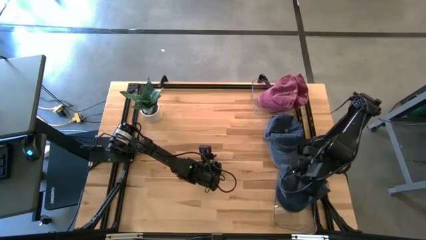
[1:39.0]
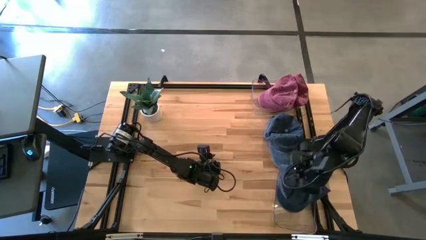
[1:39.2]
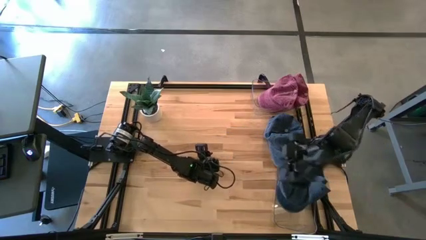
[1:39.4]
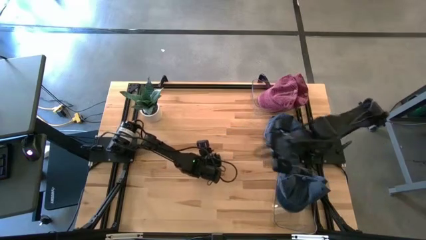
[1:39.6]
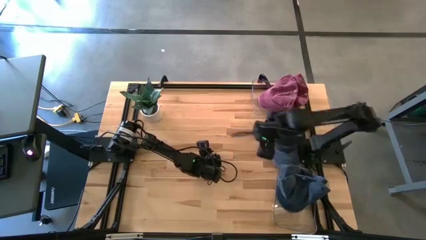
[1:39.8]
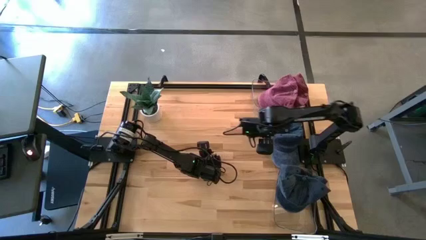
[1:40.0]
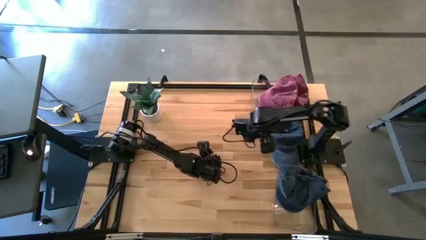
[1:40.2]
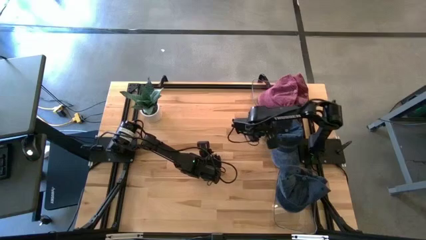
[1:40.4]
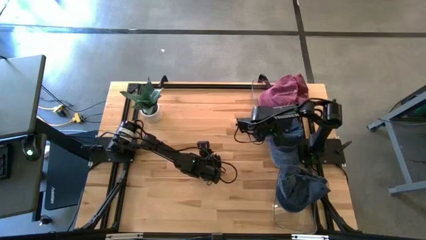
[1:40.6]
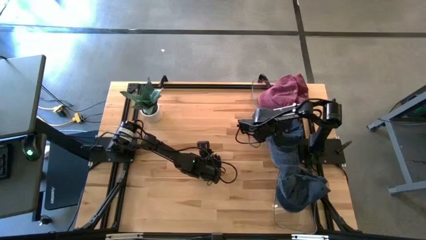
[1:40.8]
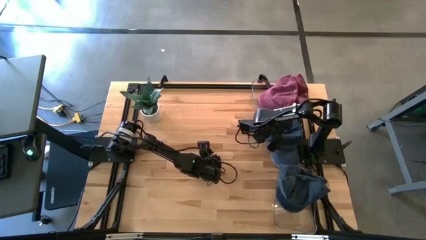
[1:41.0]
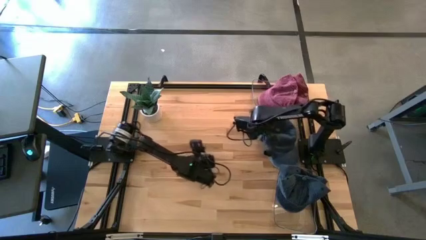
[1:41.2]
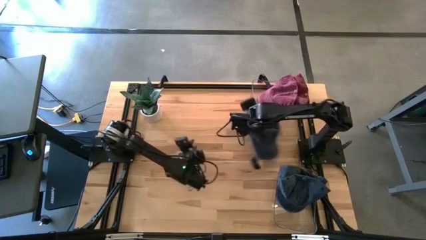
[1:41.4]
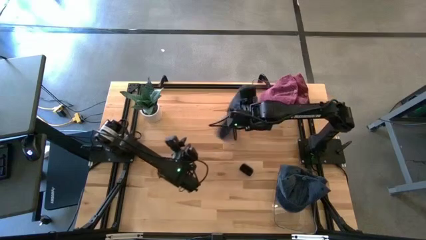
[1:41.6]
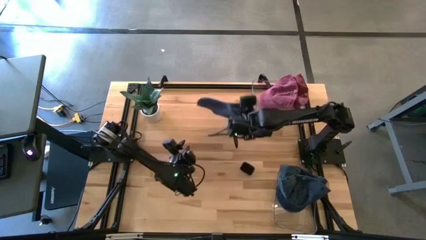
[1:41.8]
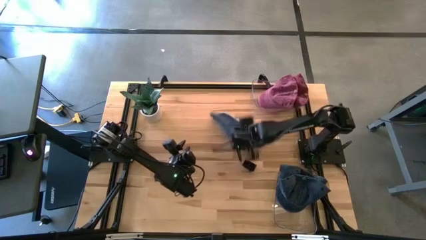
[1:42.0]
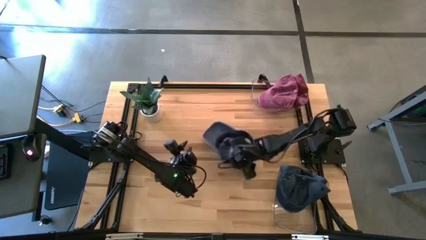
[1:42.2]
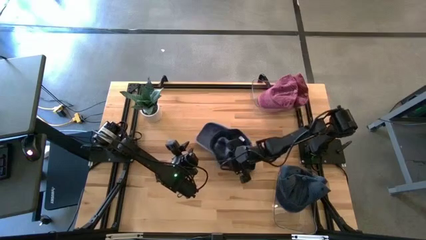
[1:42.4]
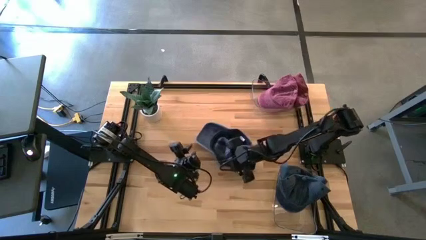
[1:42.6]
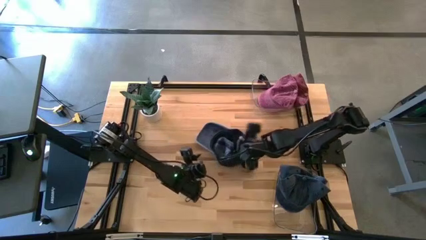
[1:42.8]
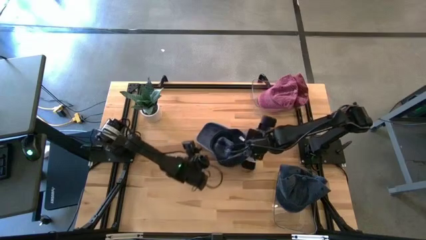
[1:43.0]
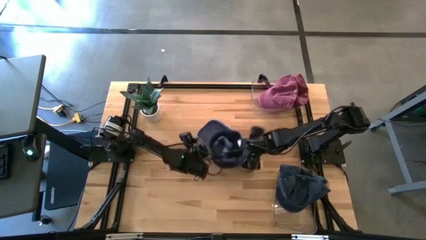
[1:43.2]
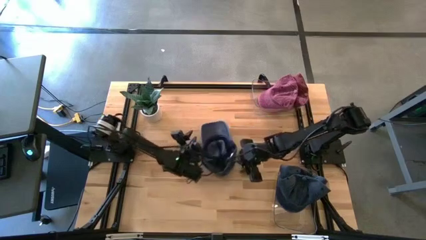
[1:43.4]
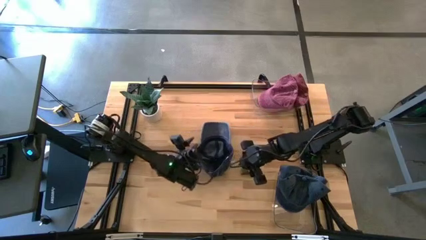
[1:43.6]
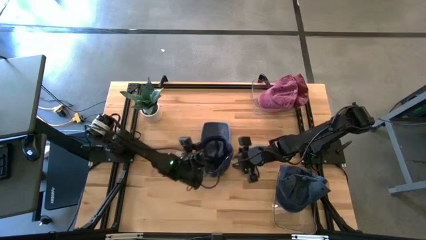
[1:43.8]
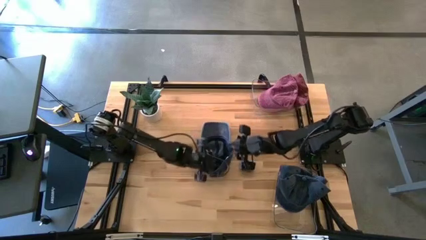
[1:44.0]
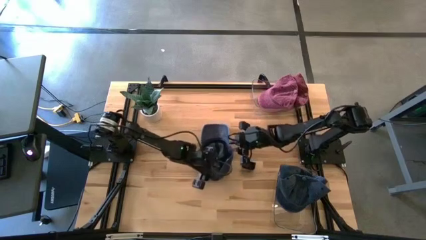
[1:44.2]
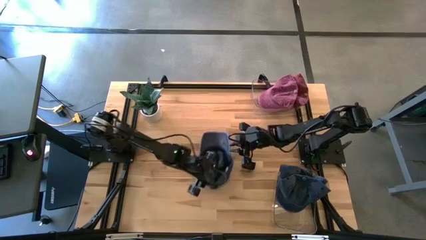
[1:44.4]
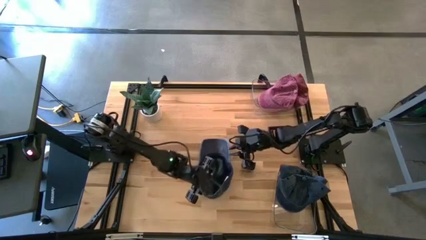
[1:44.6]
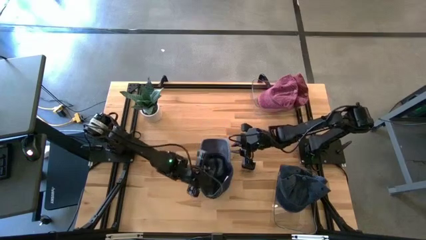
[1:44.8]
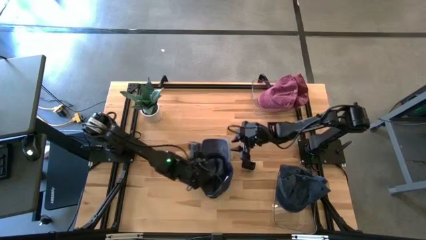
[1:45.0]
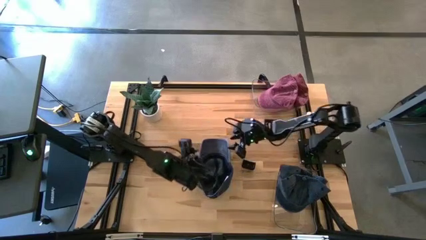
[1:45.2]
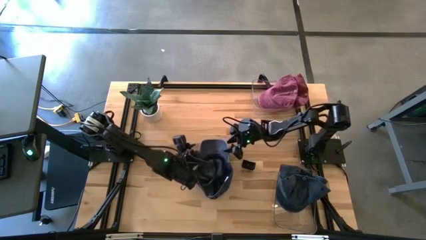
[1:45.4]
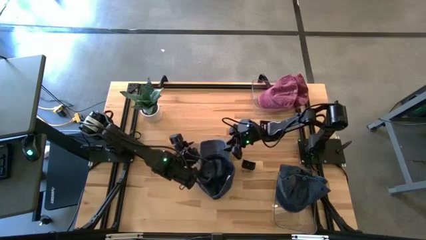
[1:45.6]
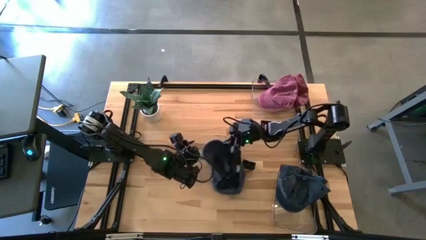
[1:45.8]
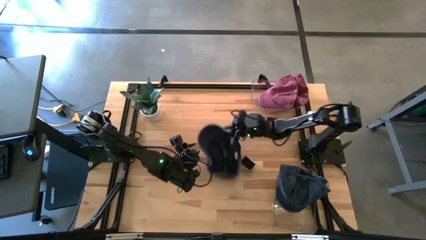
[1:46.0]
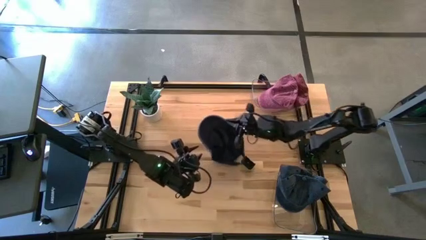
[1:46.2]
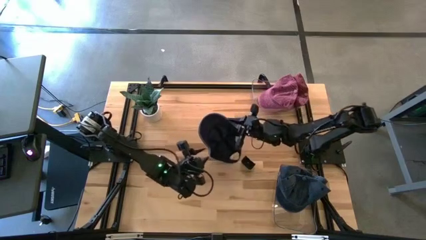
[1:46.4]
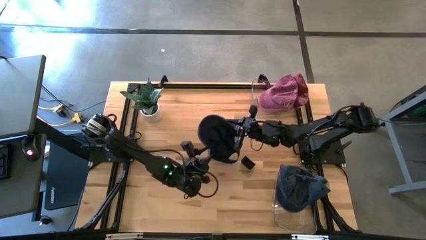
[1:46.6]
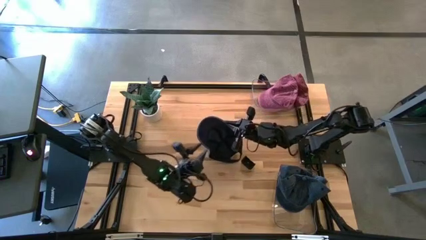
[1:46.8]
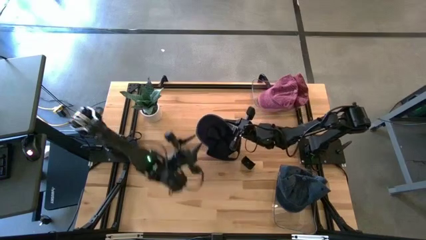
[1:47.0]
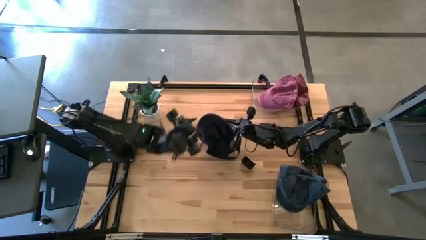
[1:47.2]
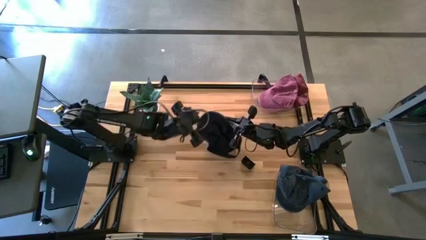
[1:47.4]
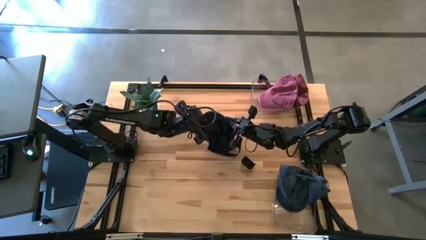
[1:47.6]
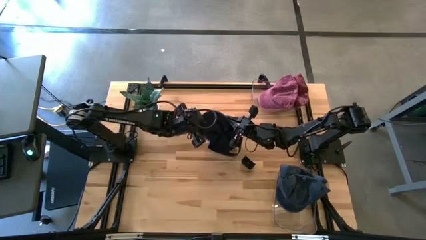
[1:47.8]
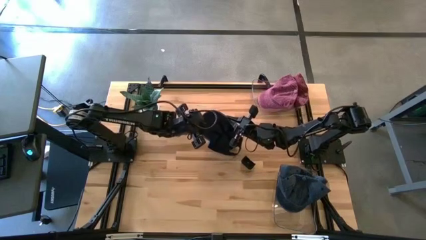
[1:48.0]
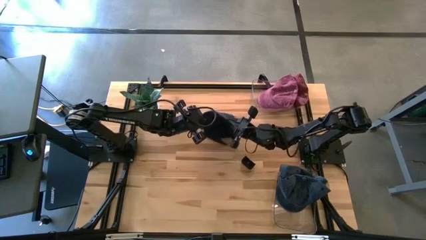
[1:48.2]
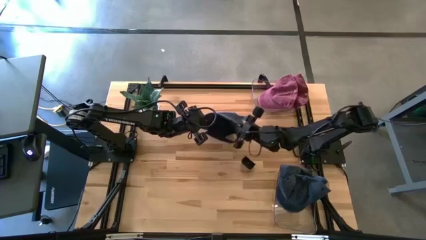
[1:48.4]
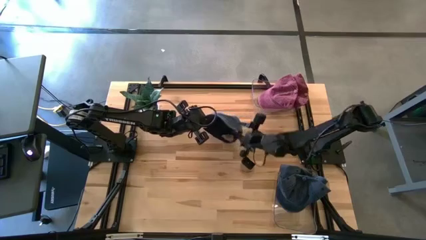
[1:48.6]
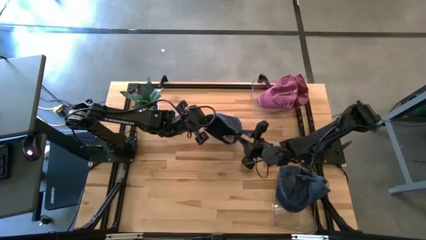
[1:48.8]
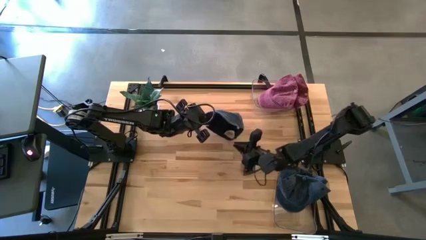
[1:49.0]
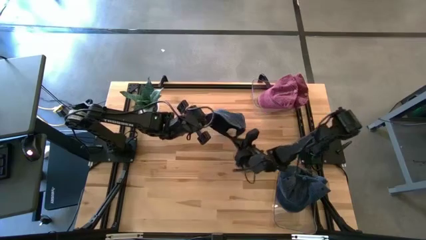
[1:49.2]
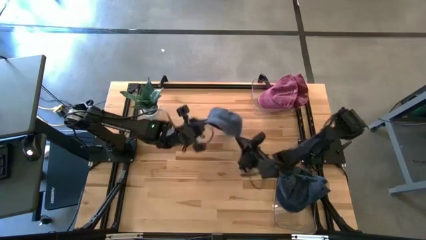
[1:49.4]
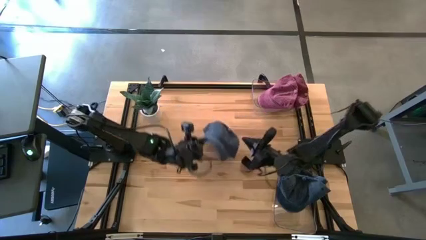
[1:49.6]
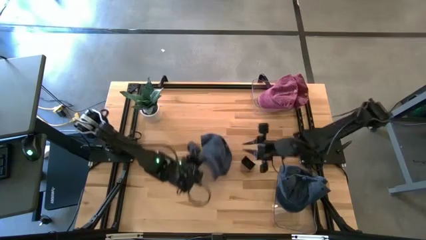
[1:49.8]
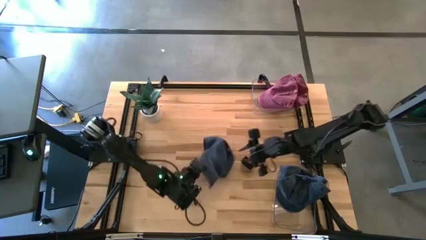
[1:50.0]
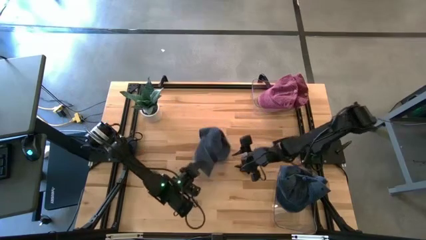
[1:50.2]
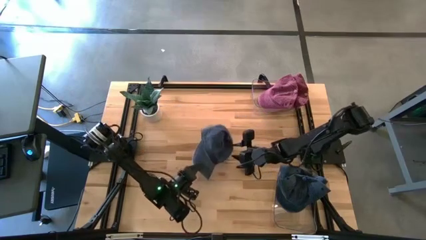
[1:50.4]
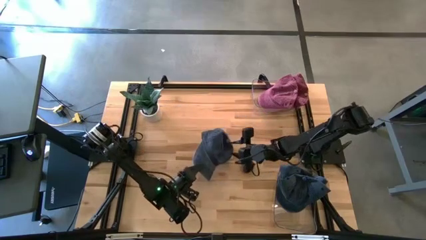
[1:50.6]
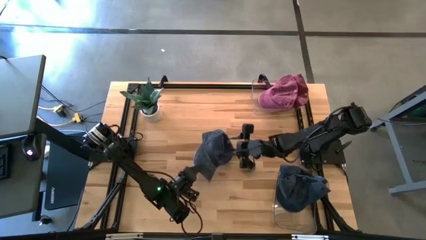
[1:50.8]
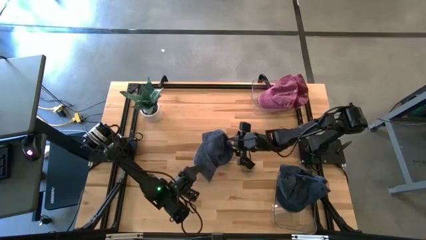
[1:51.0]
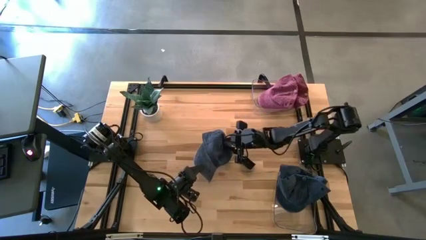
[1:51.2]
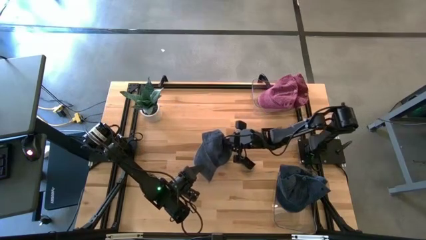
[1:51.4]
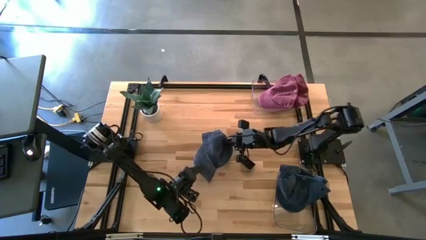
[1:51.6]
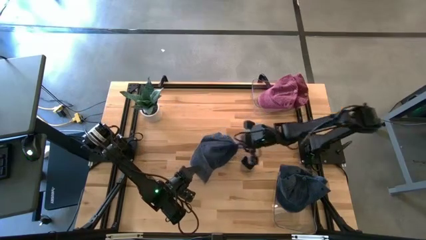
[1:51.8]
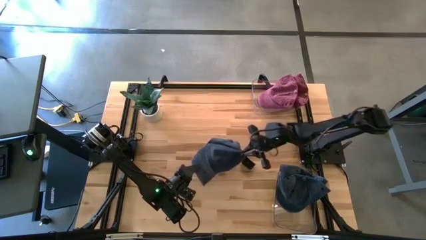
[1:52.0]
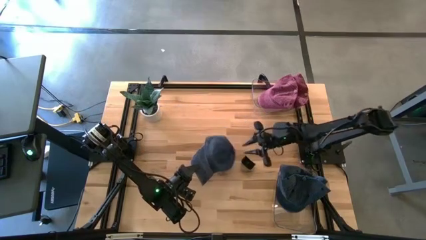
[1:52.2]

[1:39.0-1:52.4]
Task: Pick & Place hat
Put the blue cap into the bottom transparent bin
